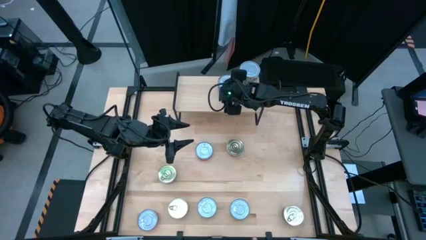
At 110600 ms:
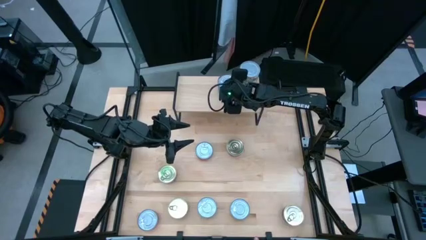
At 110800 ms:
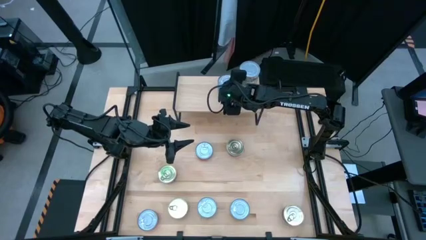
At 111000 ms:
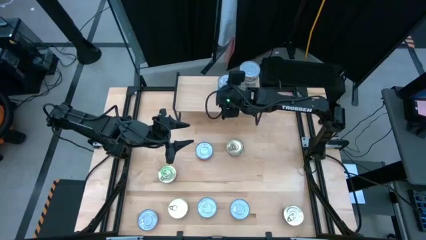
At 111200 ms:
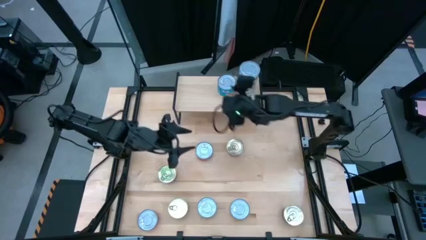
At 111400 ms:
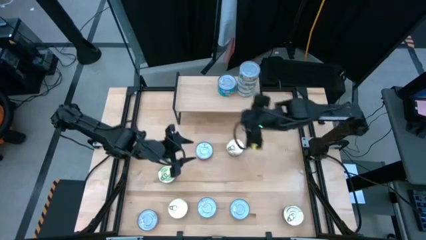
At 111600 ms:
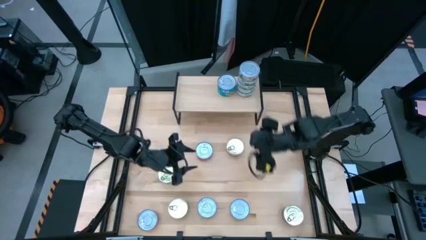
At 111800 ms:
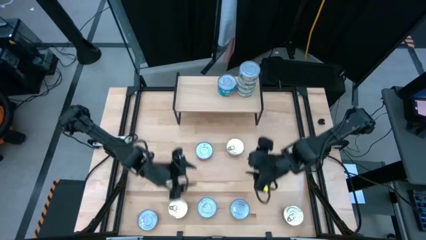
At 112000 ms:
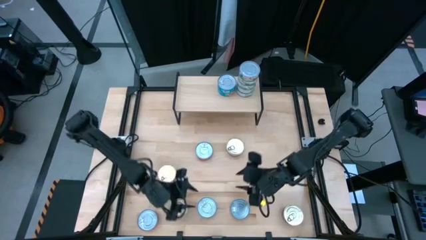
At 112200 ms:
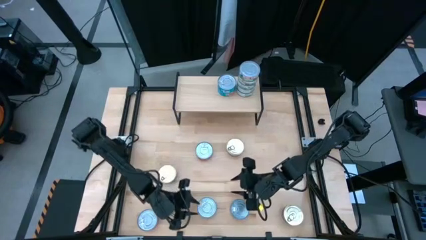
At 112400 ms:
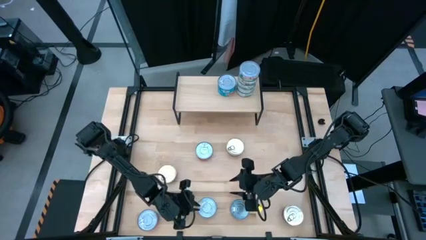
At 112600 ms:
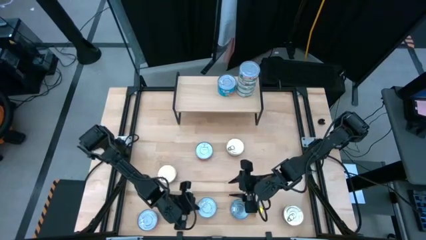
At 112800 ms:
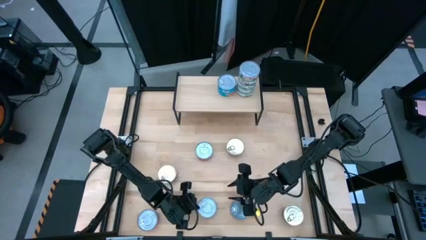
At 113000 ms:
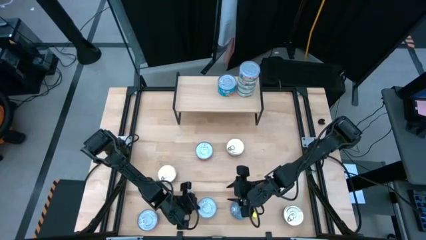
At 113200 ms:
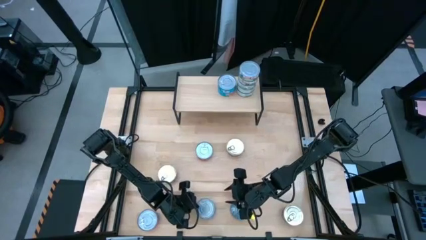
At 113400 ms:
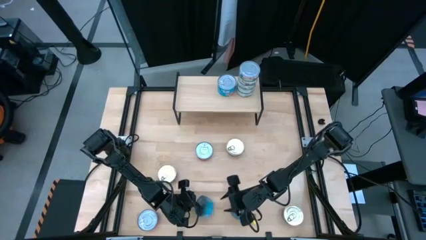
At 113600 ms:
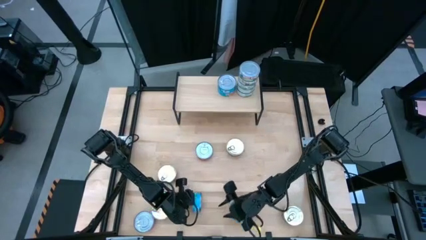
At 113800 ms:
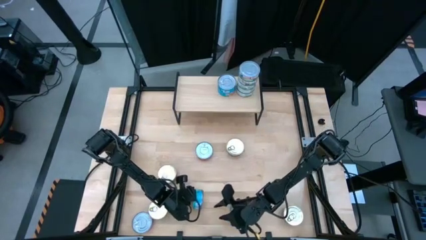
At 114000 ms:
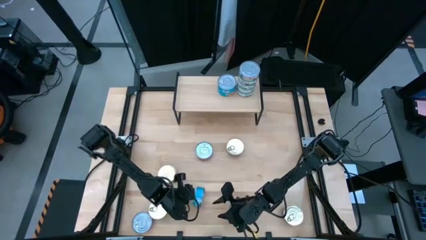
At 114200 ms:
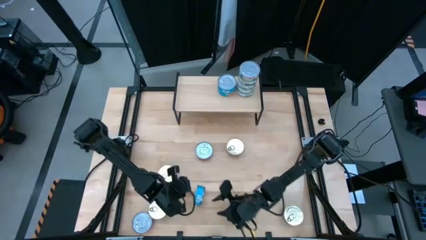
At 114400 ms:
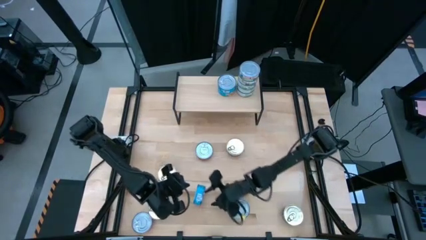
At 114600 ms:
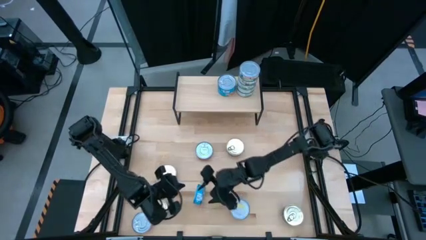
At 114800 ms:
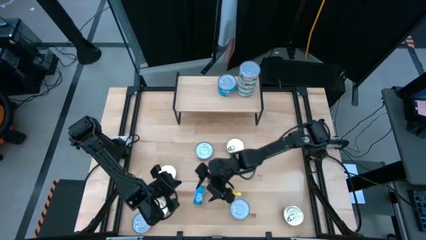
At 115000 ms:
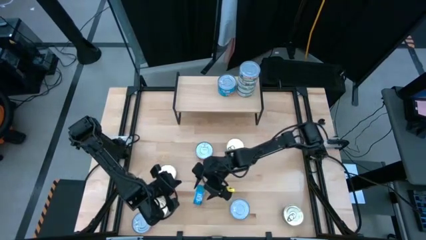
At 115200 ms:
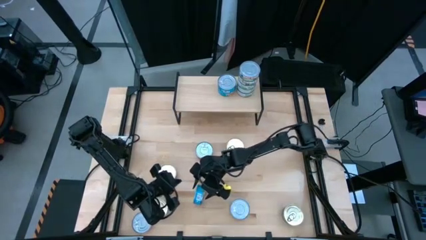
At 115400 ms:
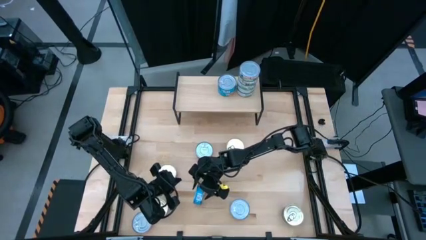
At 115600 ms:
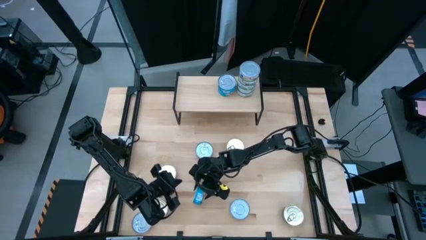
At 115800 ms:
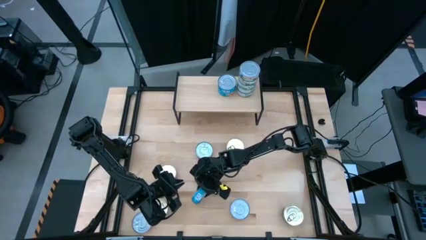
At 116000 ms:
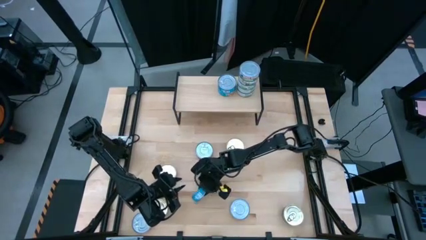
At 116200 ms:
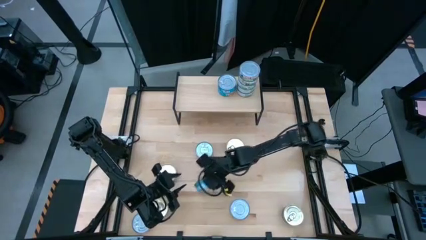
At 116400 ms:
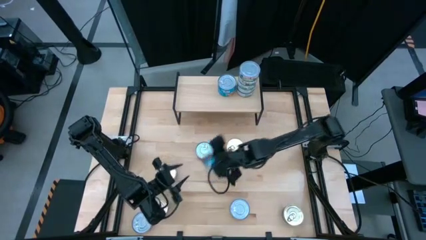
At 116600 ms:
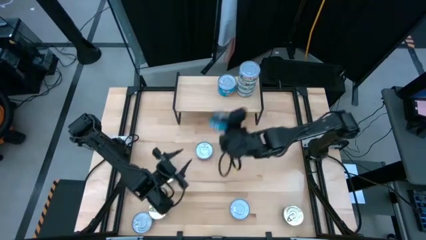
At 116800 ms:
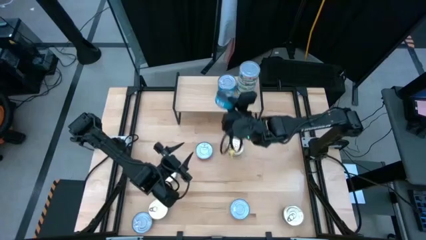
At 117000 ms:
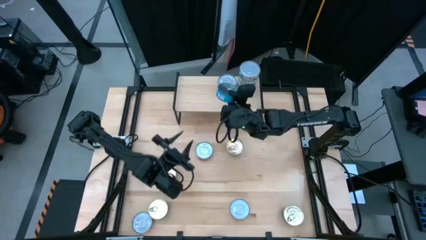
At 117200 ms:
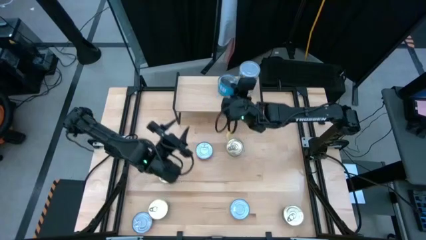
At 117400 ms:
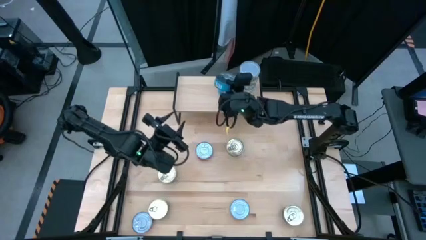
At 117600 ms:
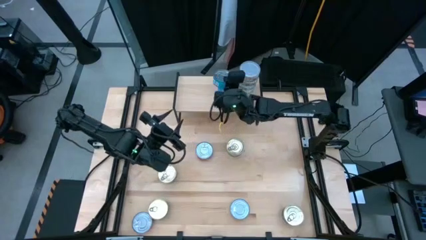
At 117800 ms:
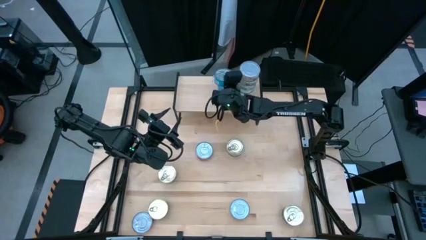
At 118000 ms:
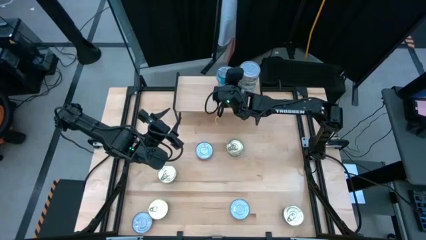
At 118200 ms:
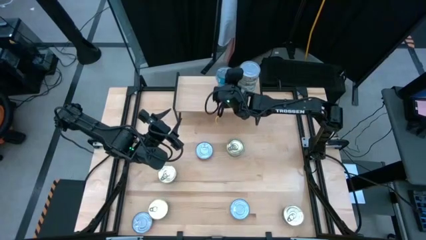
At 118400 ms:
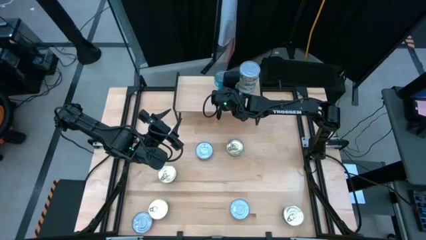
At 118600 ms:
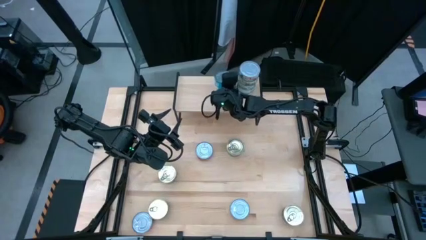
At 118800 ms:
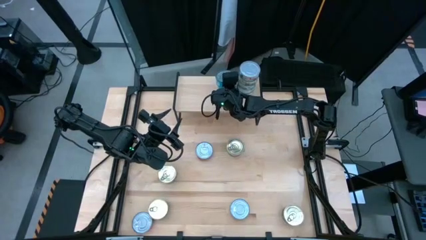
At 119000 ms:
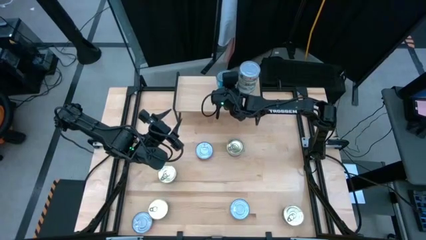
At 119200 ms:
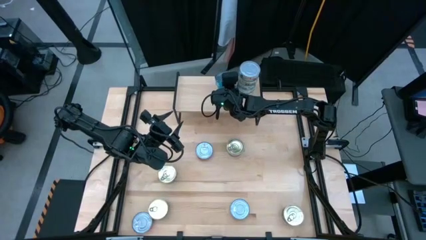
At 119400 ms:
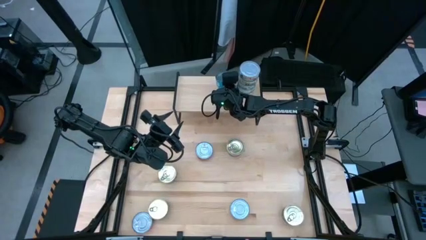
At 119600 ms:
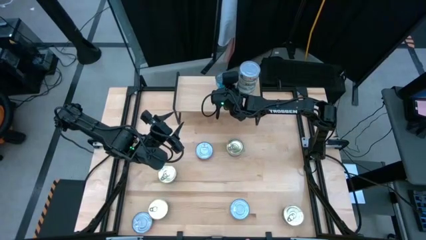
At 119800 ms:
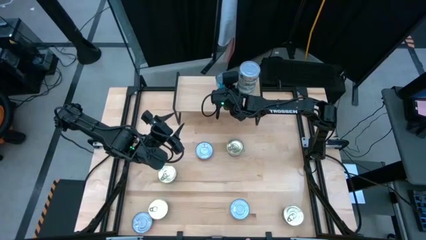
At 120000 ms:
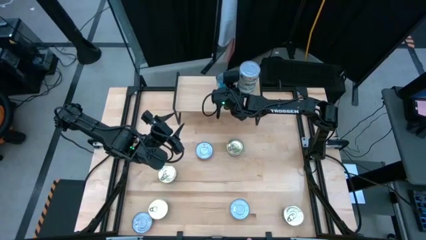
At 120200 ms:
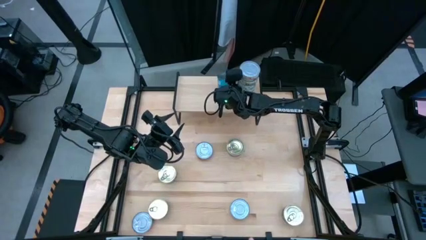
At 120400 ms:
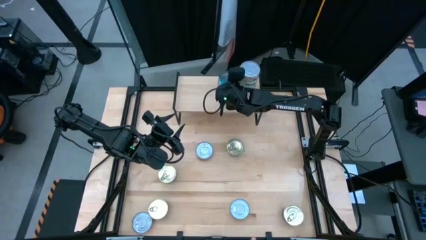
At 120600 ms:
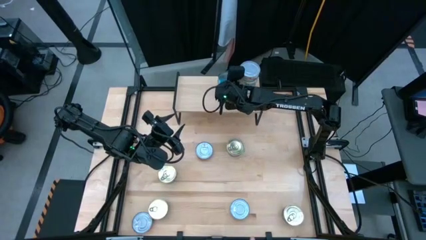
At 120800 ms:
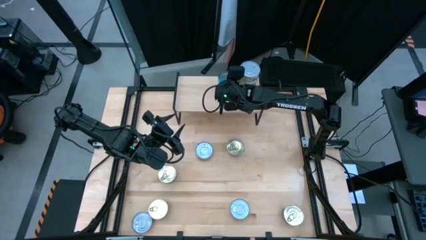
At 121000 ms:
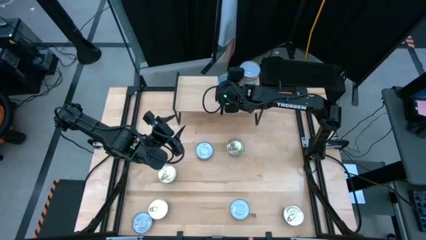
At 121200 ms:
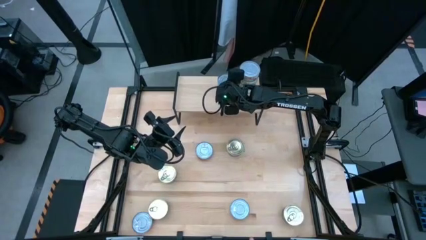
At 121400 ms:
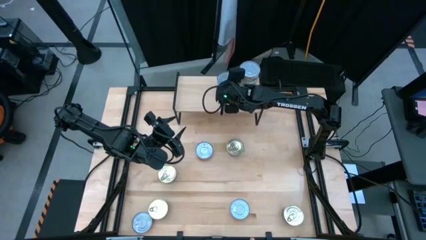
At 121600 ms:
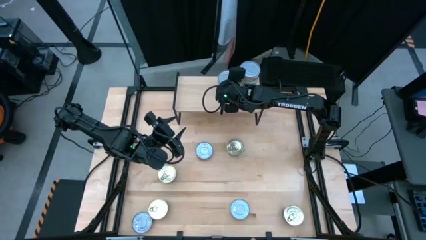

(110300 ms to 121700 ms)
Task: Stack canned seafood by type on shelf
Stack the blue tuna can on top of the other blue tuna cans on the shelf
